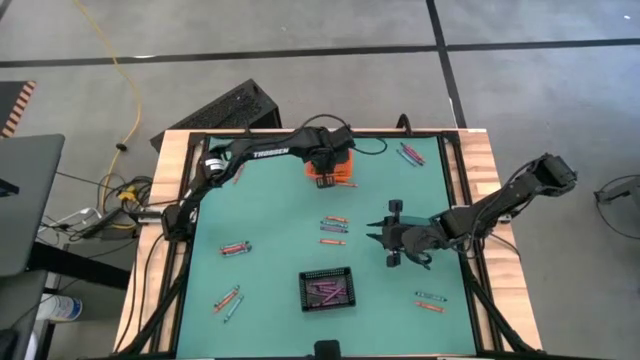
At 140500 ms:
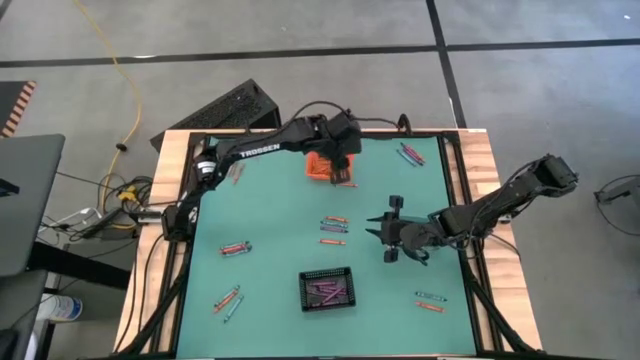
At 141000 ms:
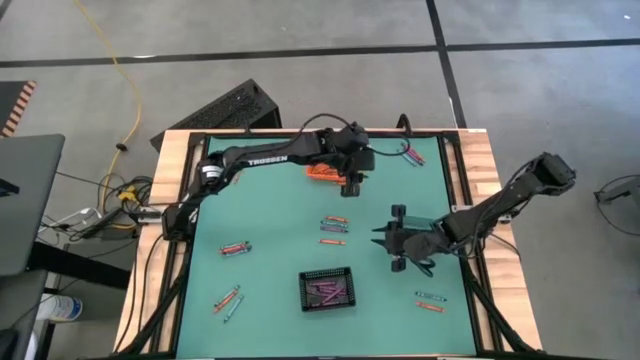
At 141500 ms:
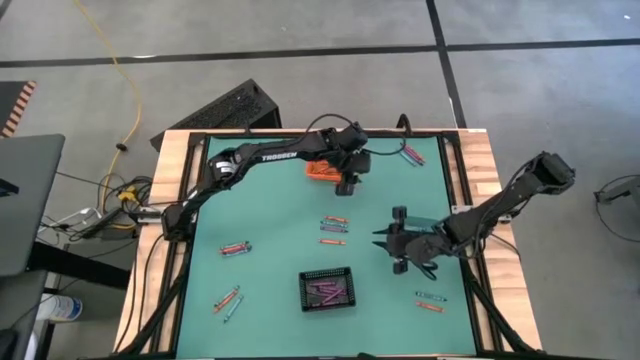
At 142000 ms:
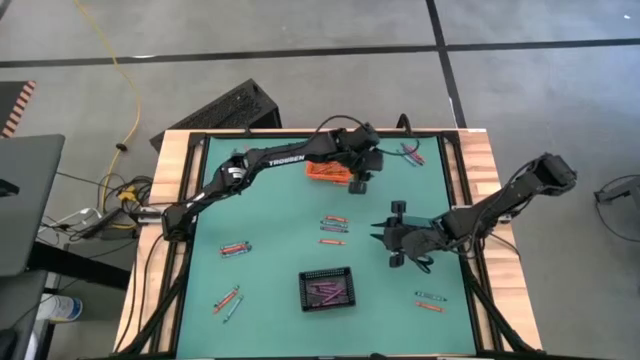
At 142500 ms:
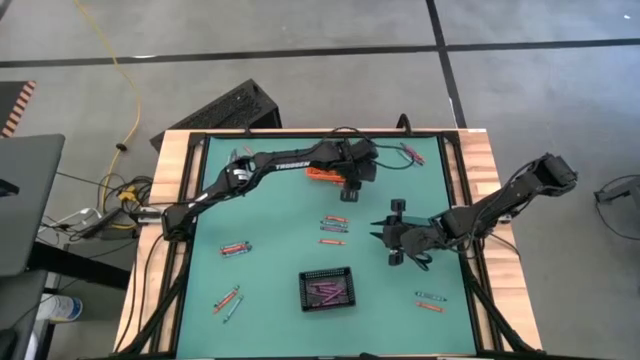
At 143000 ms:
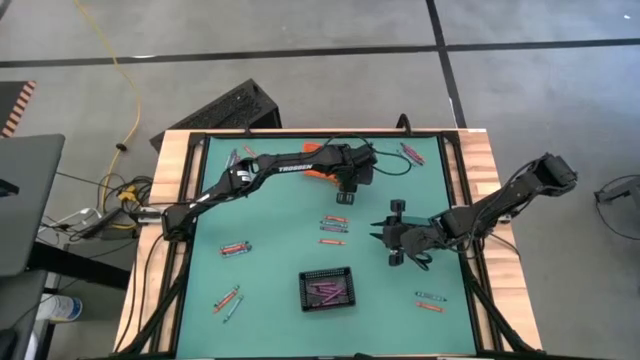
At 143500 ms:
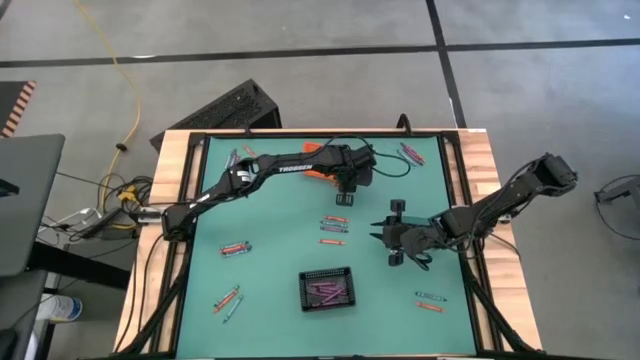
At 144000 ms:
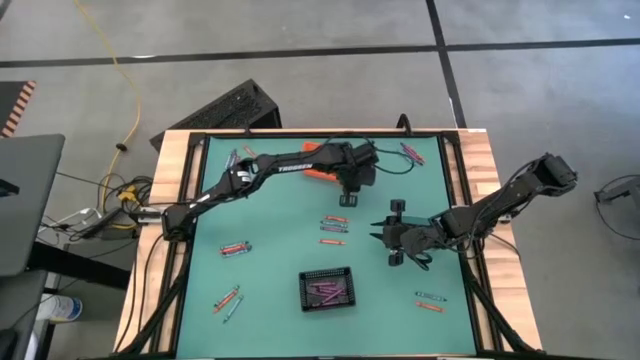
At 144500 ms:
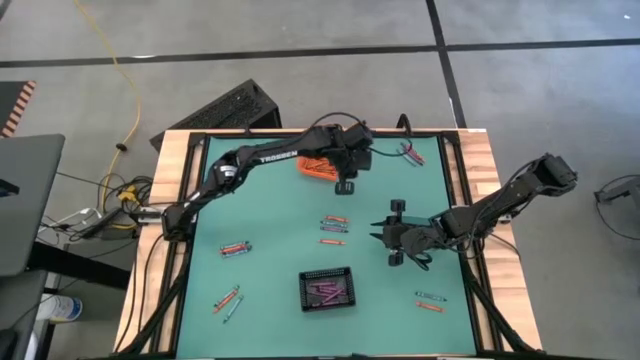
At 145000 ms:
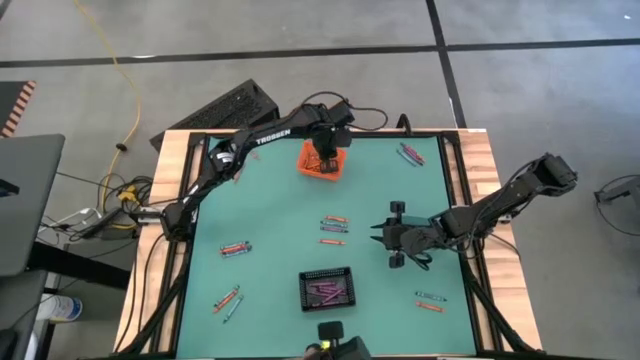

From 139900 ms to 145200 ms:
Task: Sort crayons
Put the orange crayon into the orange bin

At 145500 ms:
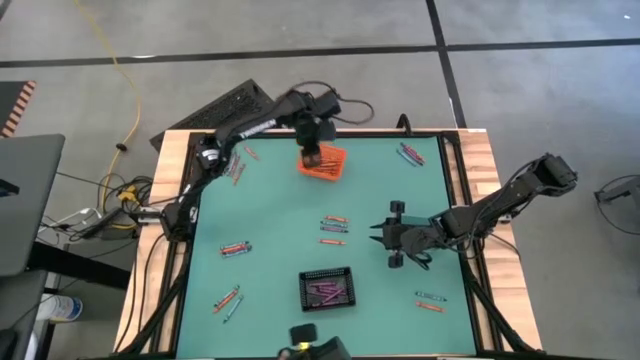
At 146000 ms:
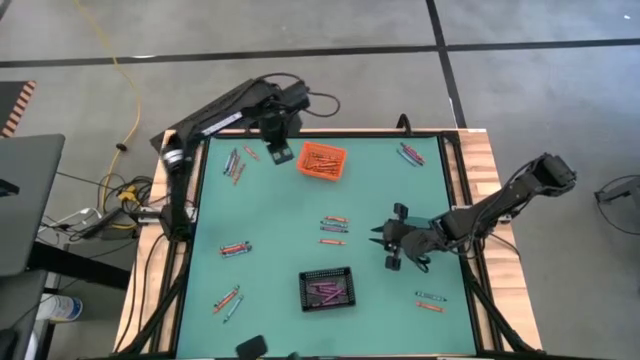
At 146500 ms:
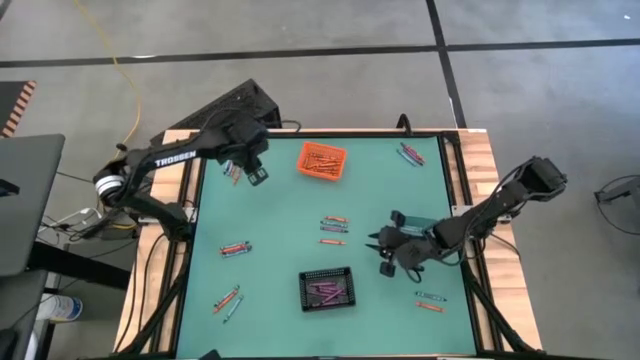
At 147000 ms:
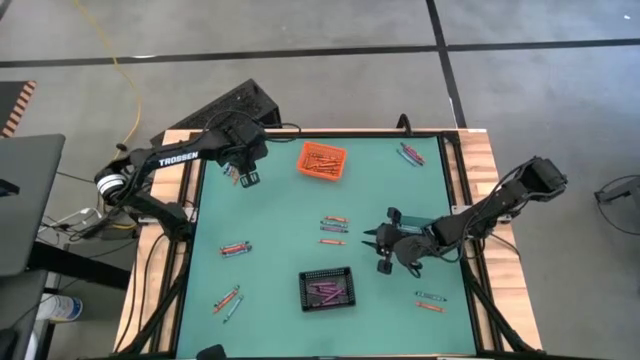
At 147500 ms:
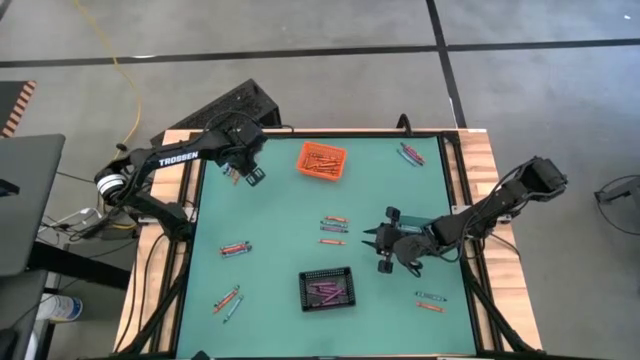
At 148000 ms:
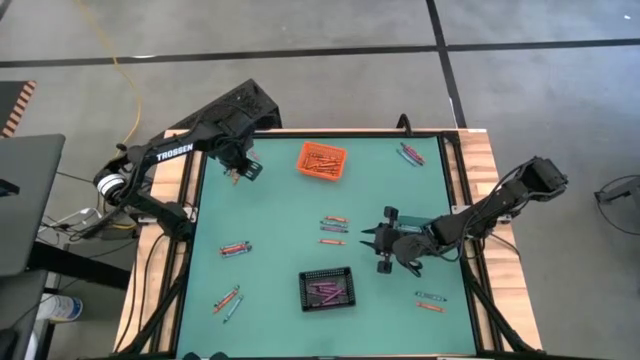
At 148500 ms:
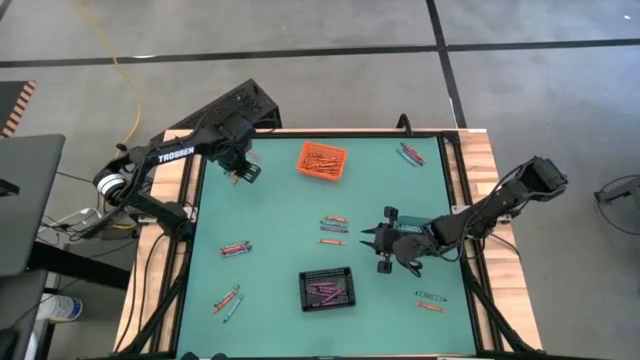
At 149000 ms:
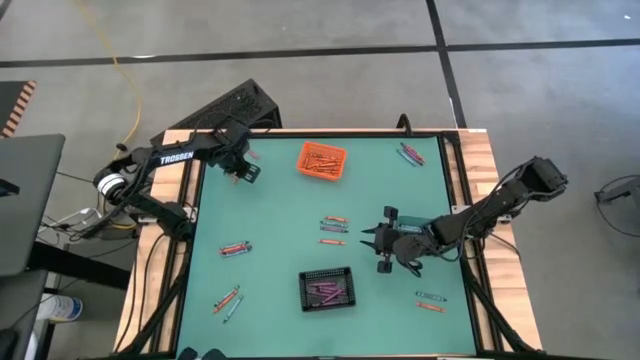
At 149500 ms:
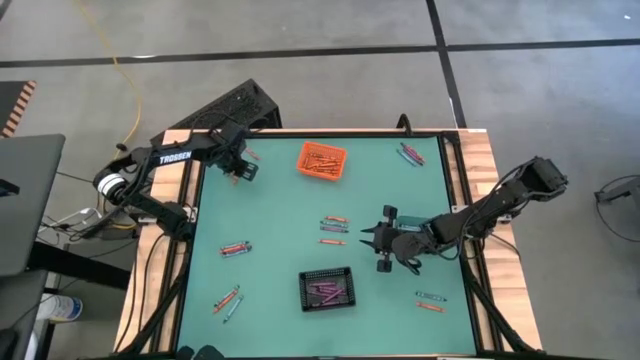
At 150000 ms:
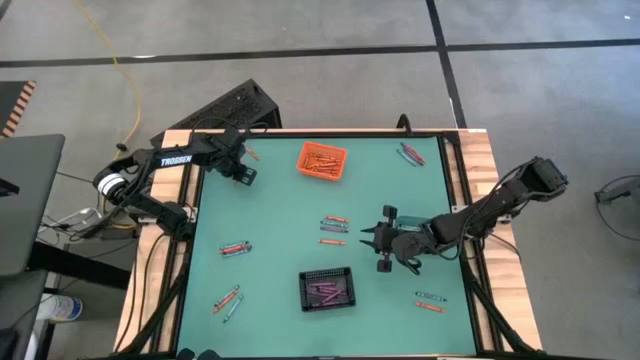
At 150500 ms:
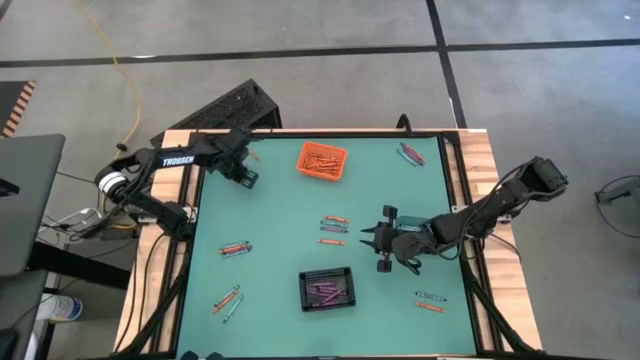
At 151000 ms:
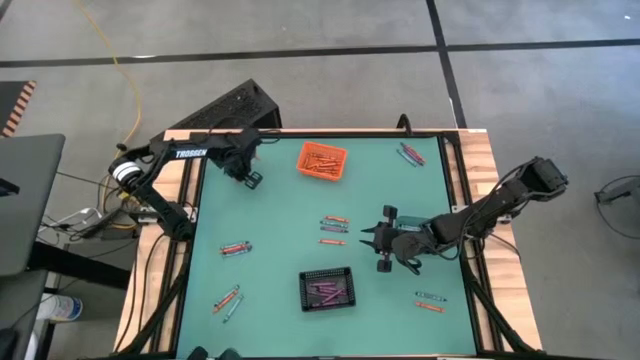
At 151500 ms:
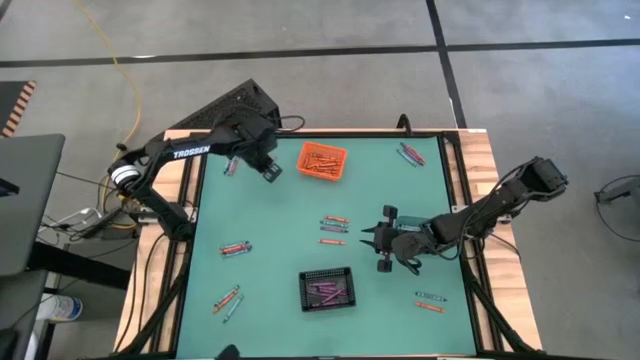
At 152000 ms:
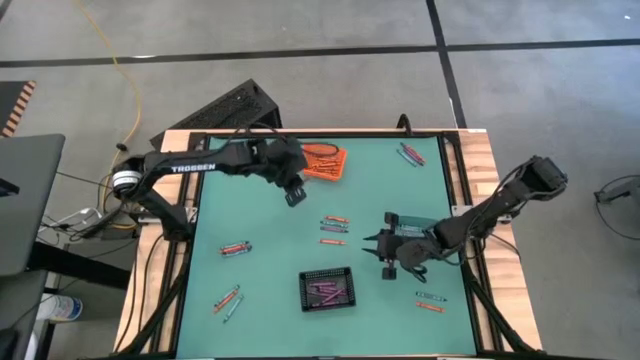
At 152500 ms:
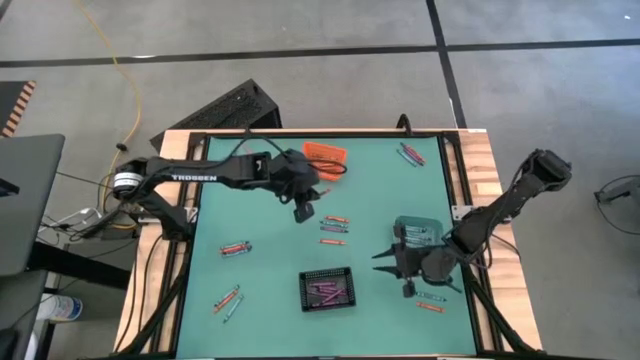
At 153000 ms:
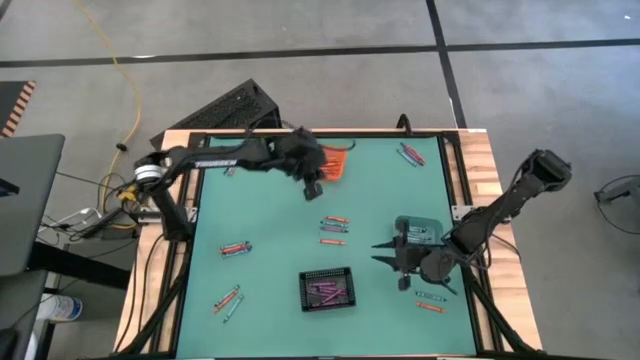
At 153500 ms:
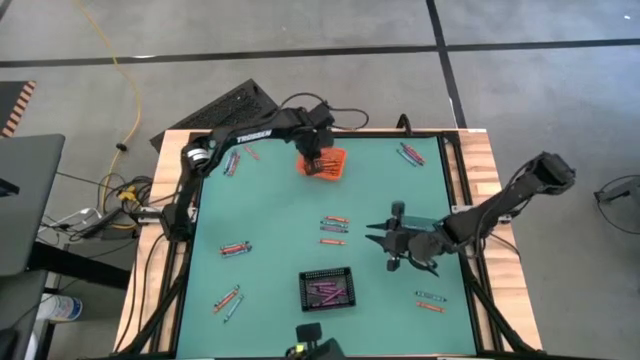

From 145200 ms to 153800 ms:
Put the orange crayon into the orange bin

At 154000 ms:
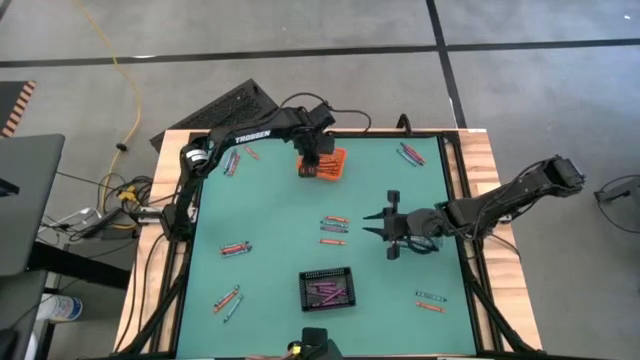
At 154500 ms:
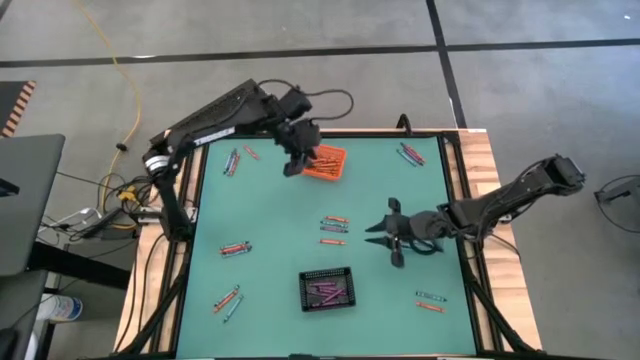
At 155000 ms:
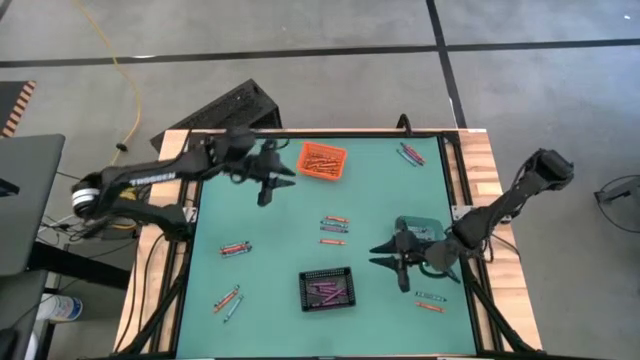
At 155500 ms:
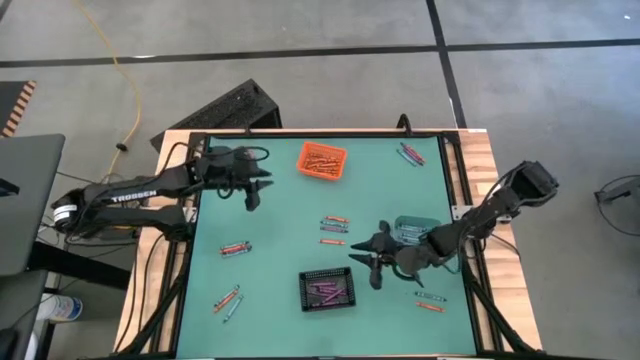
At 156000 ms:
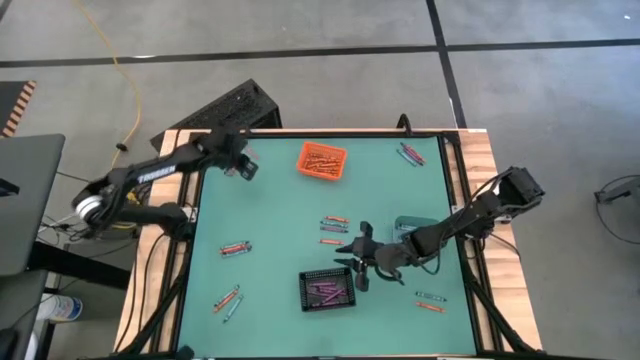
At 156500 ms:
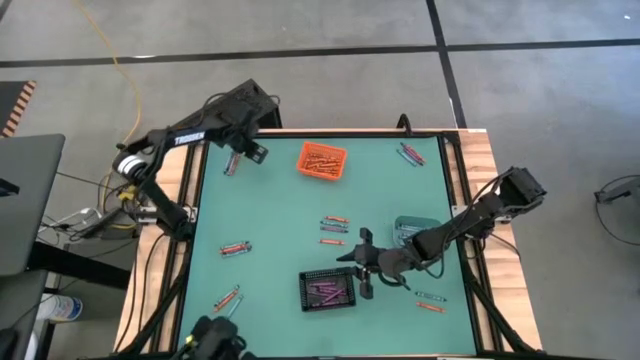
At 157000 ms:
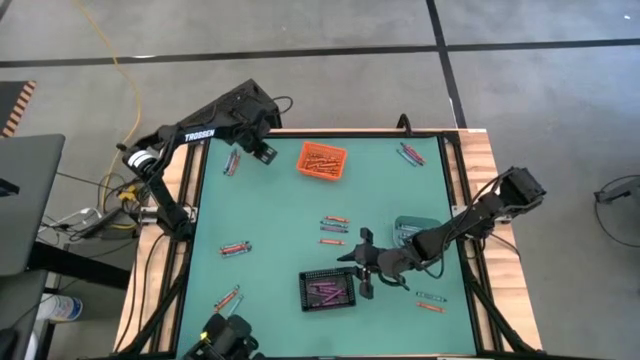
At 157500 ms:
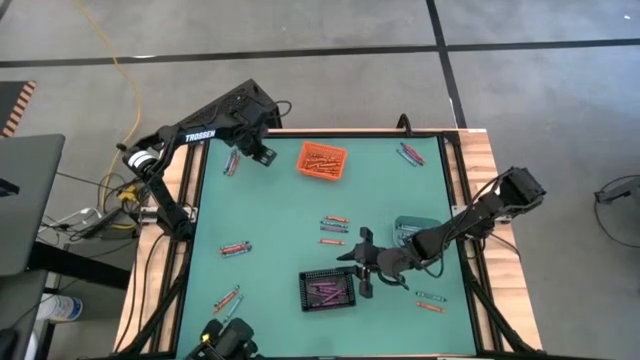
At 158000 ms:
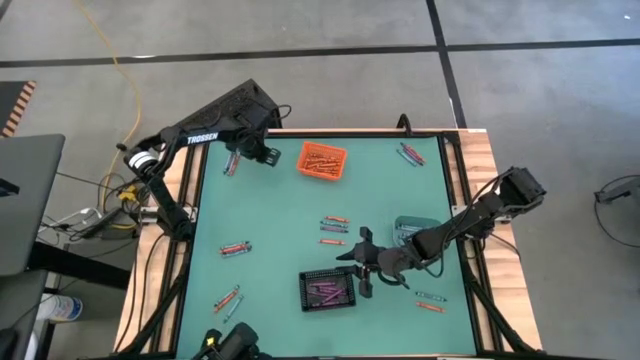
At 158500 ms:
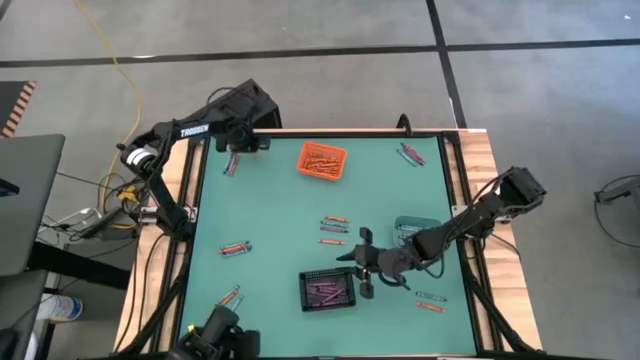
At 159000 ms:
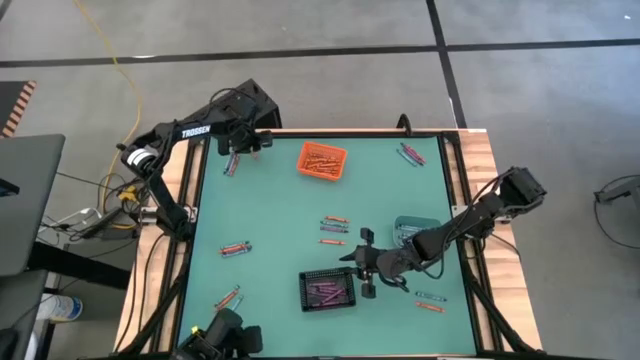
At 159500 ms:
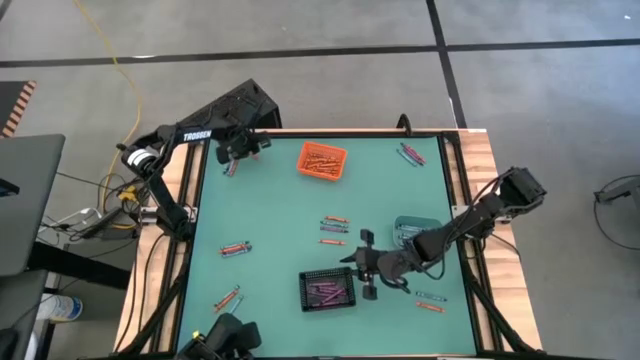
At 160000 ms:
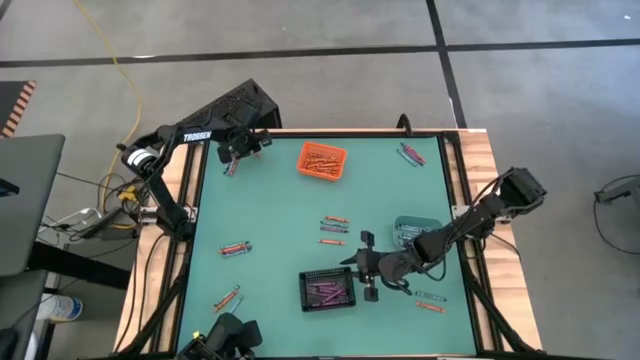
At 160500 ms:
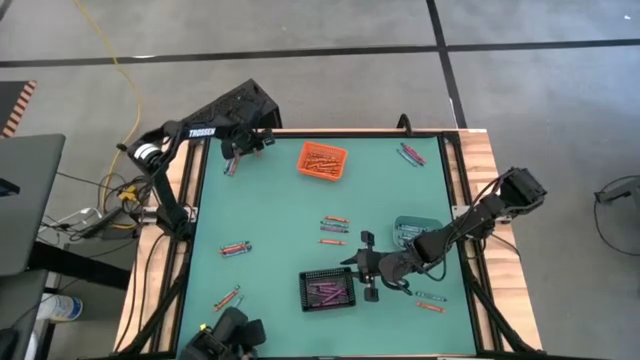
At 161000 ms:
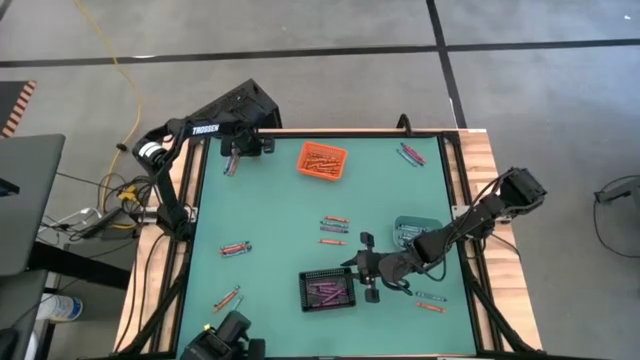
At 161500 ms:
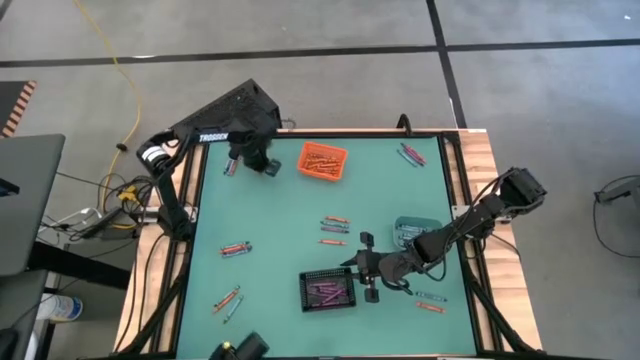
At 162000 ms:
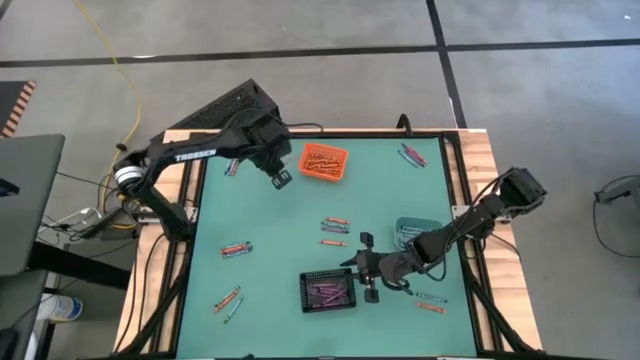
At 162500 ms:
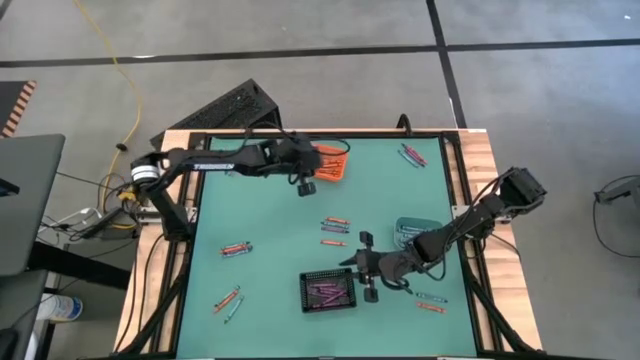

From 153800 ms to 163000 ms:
Put the orange crayon into the orange bin
